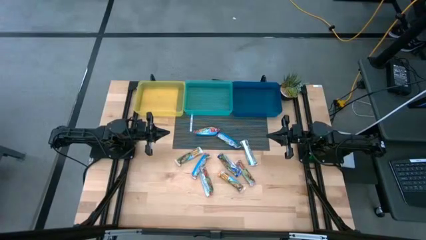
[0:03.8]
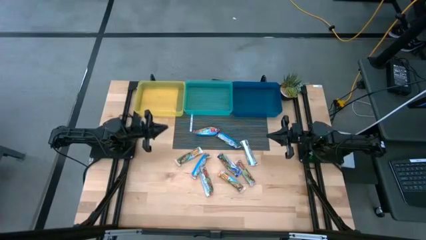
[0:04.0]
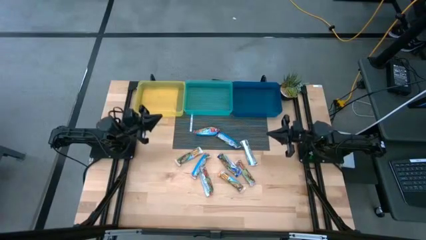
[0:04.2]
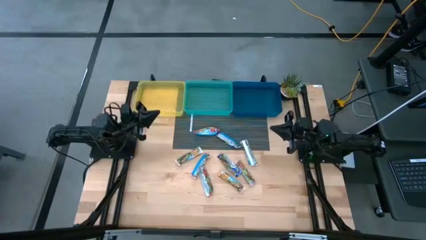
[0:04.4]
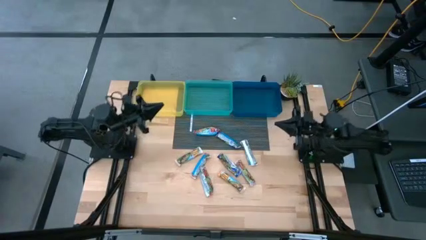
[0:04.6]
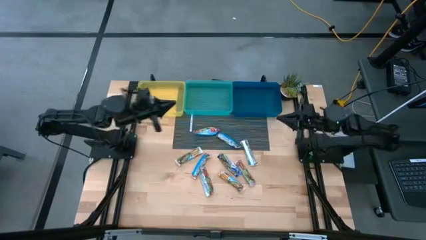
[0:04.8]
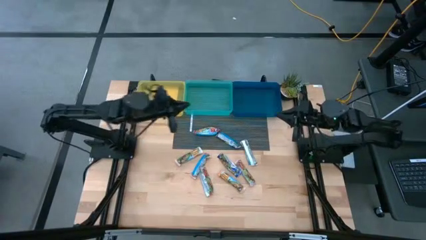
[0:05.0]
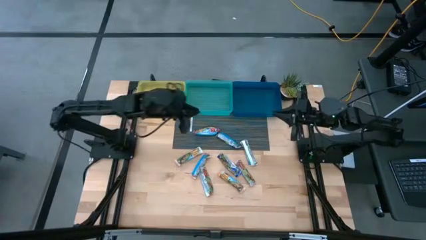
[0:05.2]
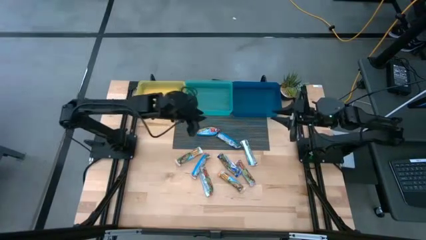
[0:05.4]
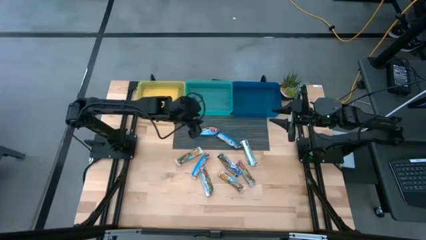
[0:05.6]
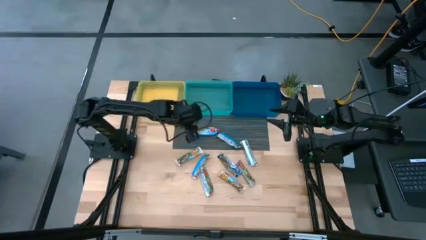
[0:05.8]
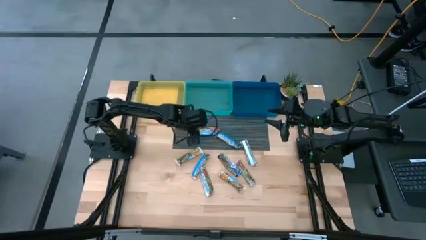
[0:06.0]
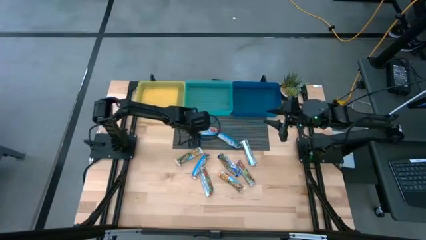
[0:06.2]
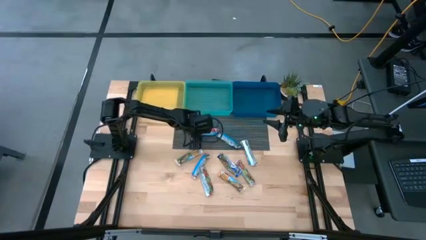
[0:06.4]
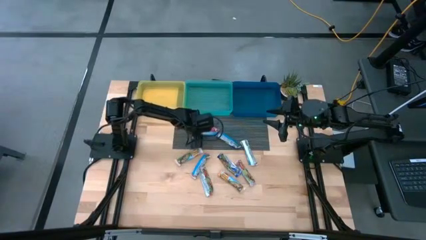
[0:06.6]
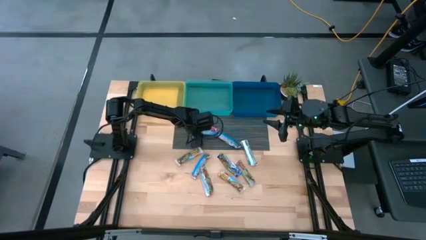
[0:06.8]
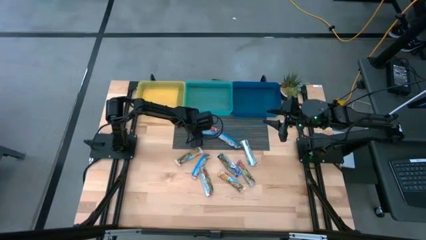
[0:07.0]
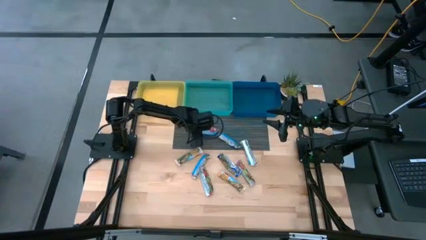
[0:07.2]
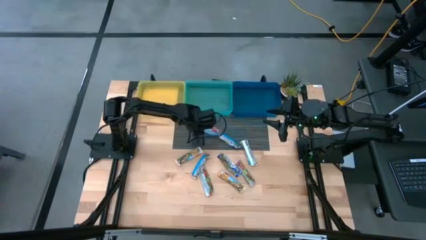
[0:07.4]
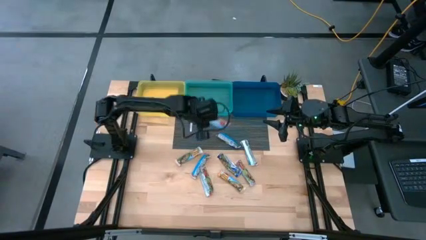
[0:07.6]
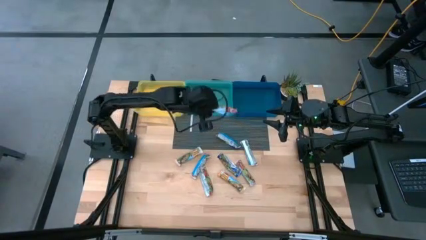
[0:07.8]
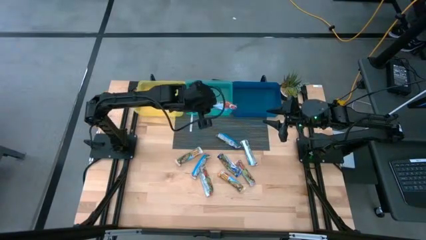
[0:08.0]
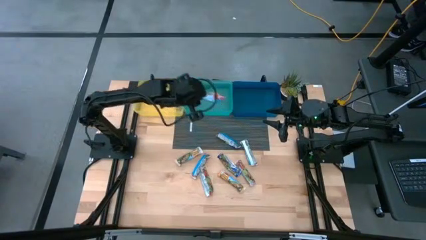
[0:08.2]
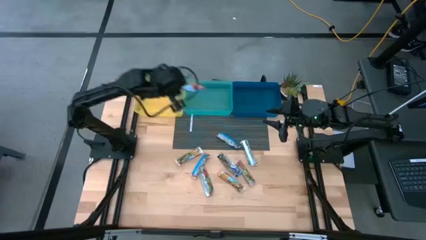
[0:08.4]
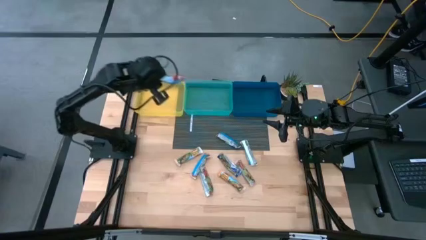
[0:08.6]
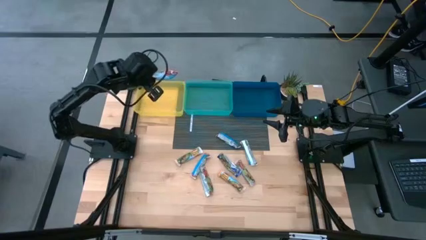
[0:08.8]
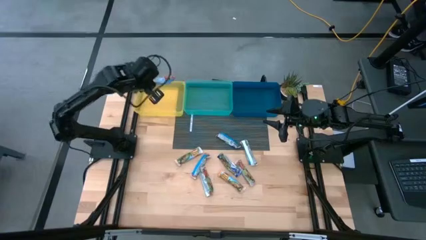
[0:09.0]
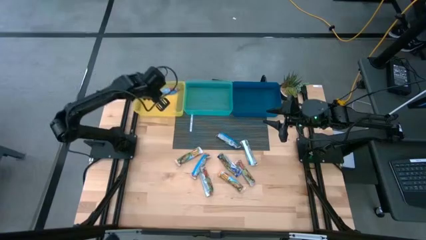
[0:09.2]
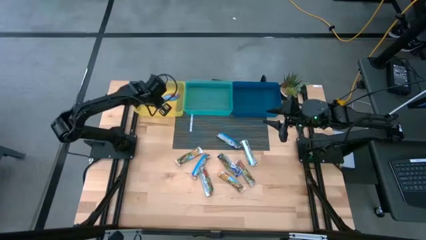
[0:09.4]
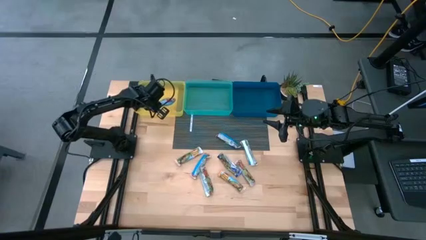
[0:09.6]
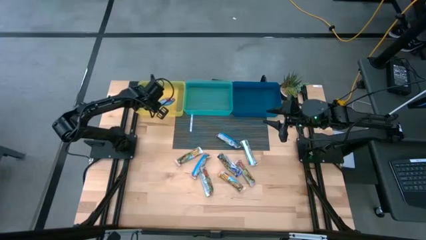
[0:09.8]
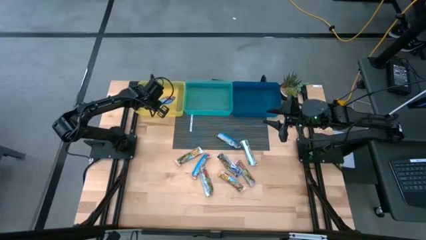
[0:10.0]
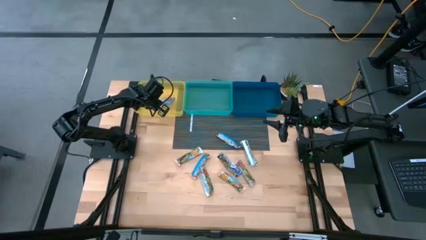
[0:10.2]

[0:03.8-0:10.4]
Task: Pick and place Granola Bars by type
Put the red granola bar into the yellow bin

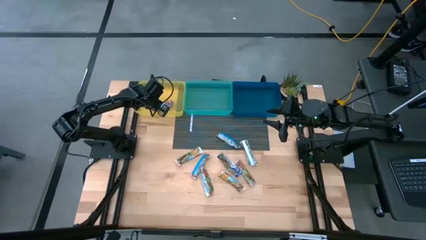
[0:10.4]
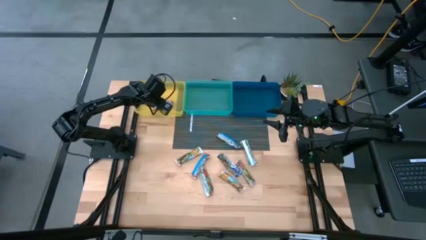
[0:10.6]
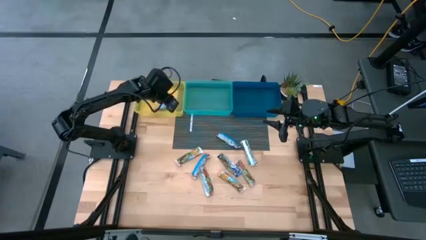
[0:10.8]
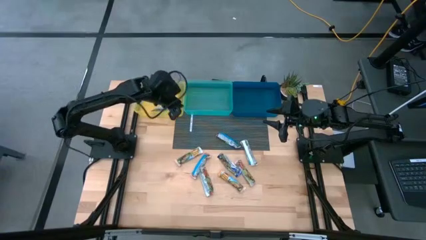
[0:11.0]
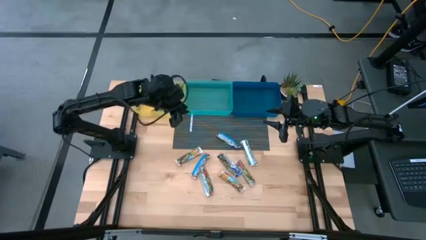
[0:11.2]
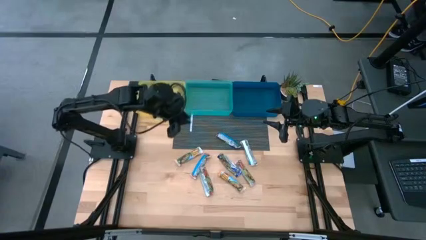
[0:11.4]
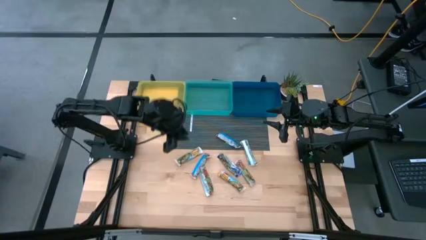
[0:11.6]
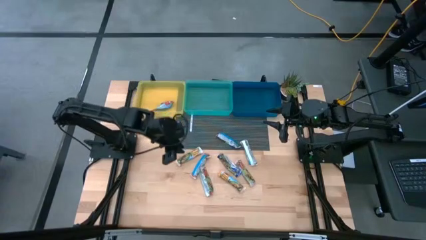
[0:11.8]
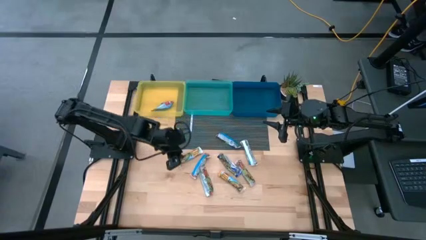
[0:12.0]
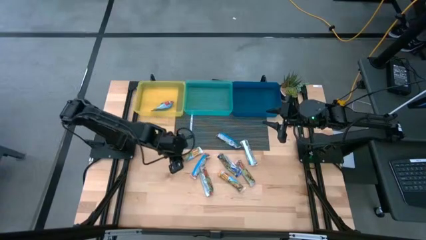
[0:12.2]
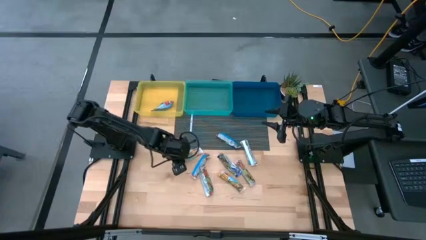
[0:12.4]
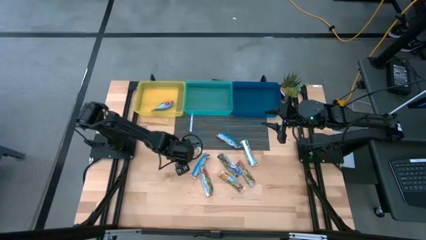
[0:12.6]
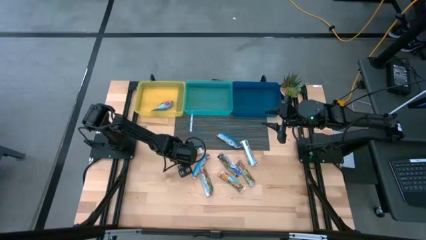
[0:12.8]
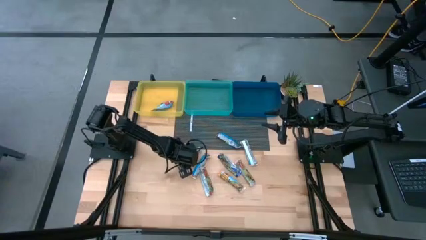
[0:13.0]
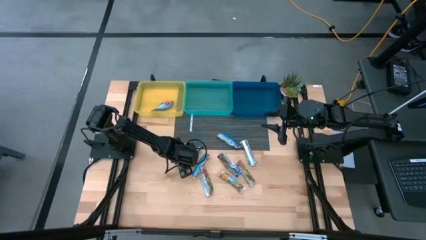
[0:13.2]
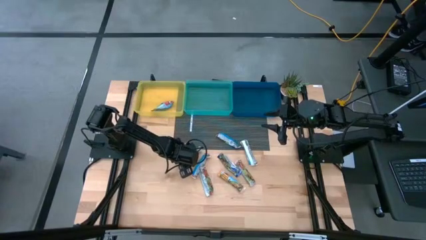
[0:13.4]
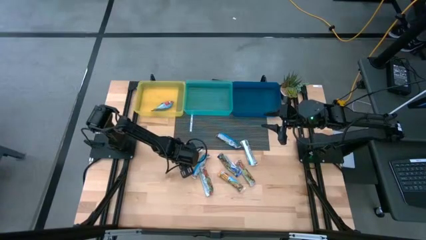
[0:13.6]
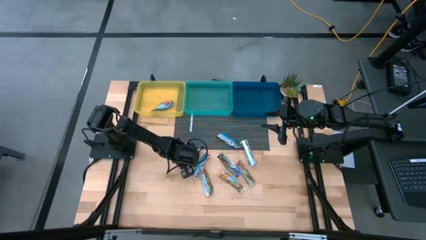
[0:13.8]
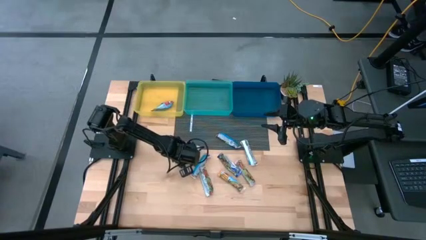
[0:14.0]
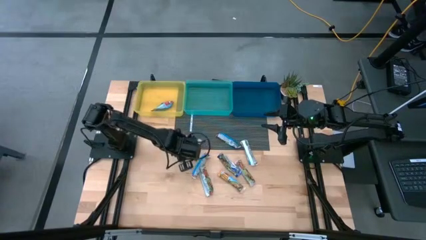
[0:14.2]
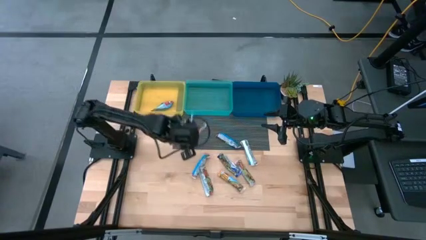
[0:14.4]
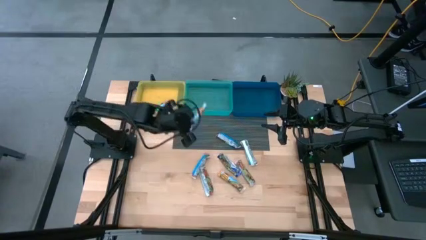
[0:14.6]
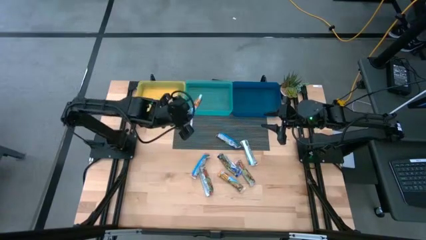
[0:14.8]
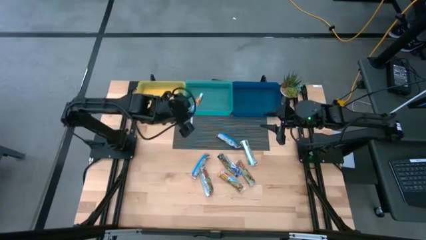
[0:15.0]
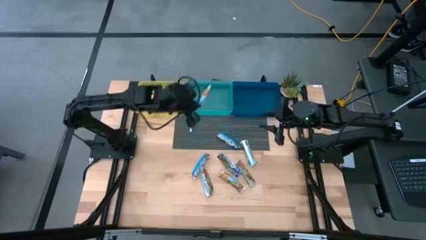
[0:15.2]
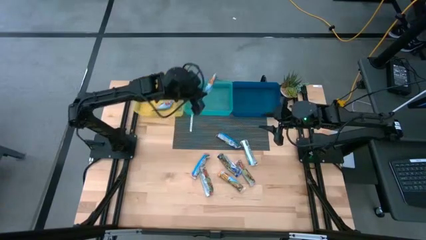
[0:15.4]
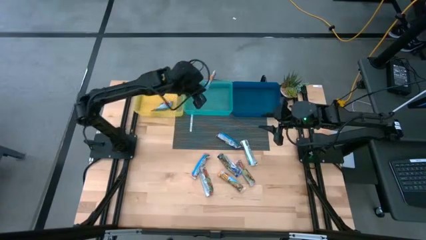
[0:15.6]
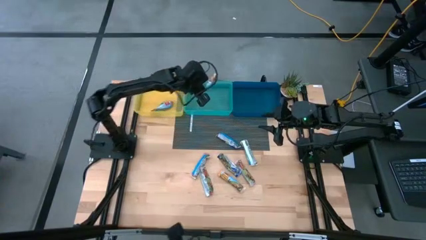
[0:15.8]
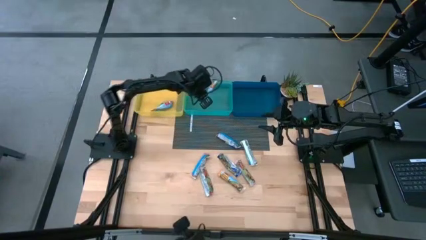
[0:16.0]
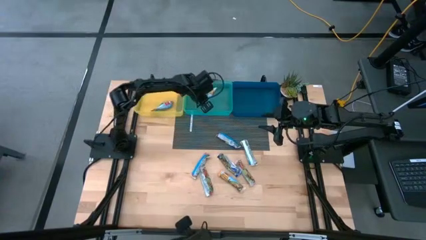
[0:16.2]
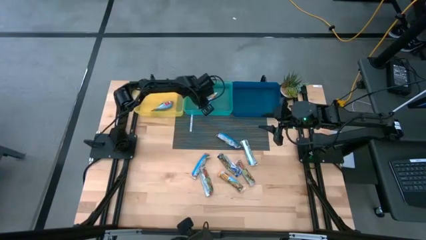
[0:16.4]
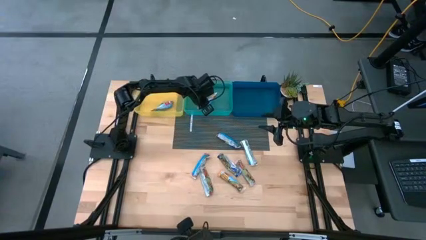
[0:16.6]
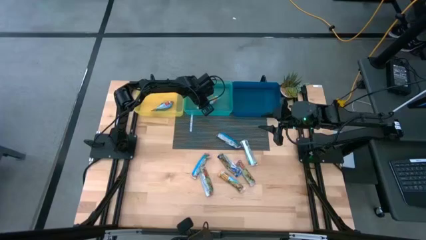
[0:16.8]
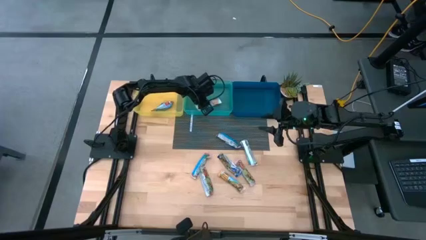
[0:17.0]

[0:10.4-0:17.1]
Put the yellow granola bar into the green bin

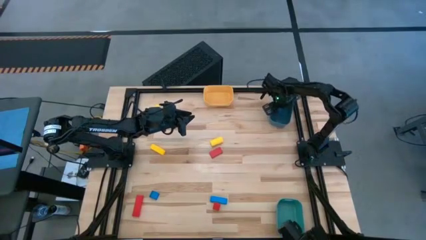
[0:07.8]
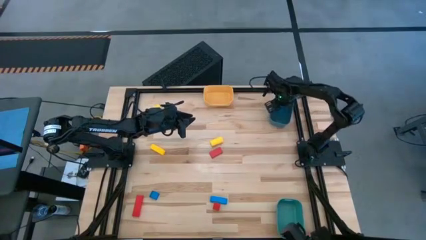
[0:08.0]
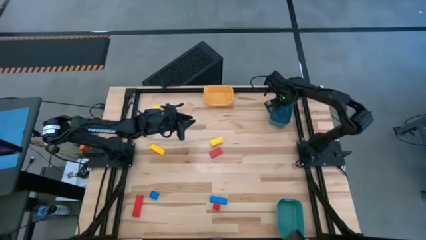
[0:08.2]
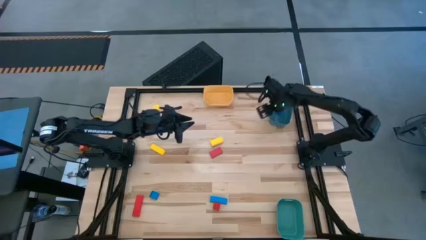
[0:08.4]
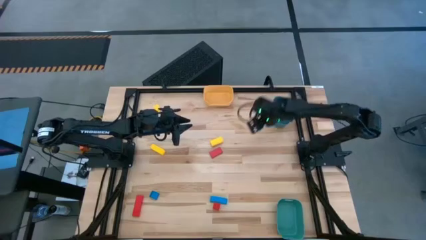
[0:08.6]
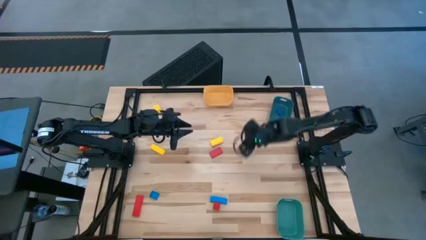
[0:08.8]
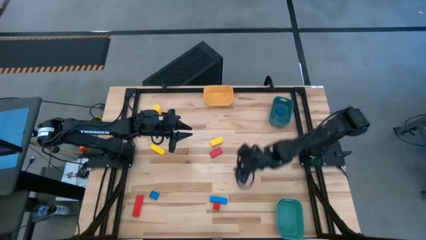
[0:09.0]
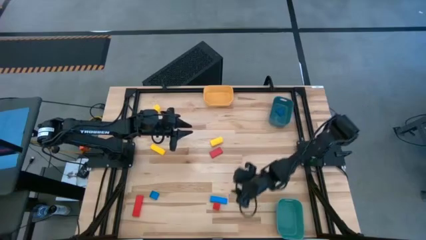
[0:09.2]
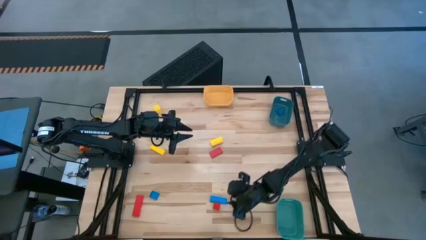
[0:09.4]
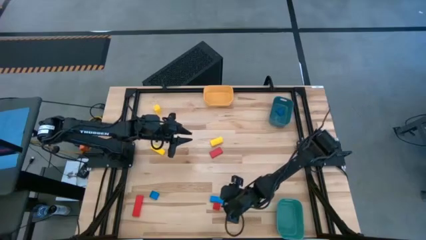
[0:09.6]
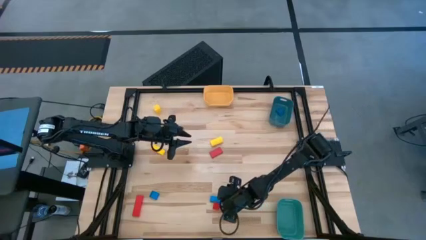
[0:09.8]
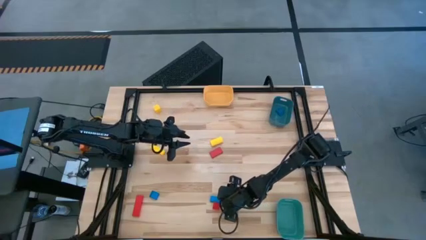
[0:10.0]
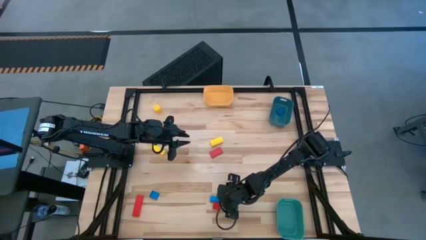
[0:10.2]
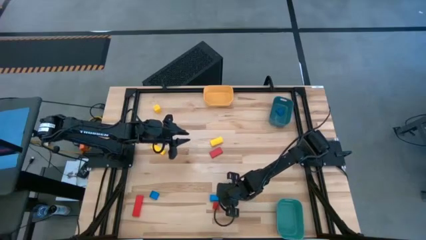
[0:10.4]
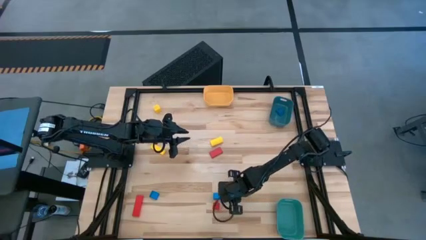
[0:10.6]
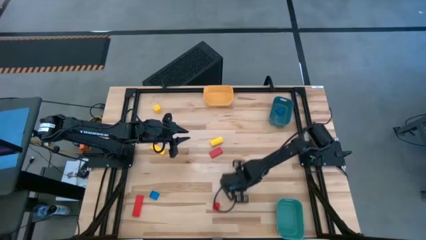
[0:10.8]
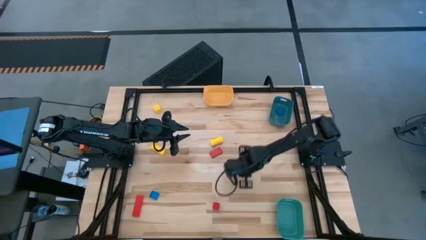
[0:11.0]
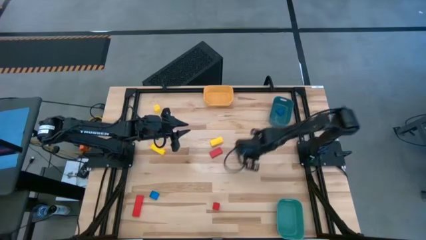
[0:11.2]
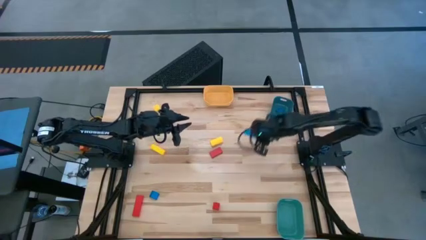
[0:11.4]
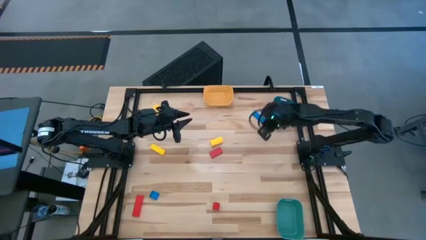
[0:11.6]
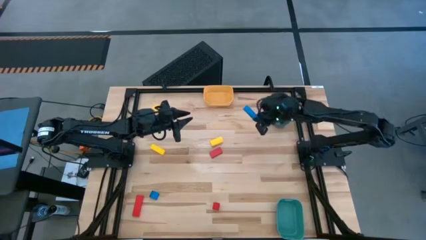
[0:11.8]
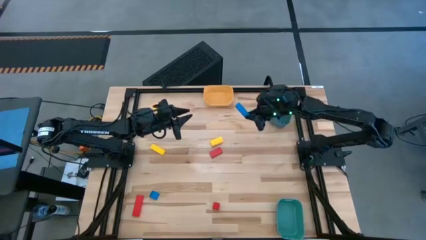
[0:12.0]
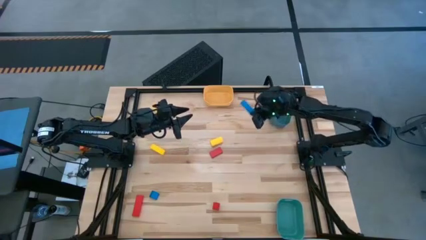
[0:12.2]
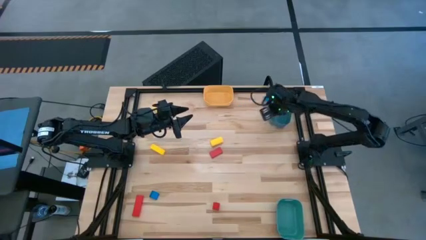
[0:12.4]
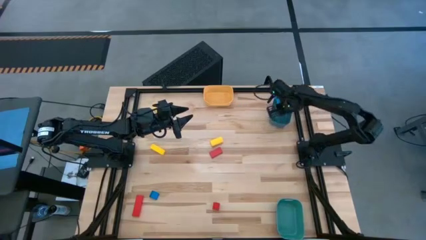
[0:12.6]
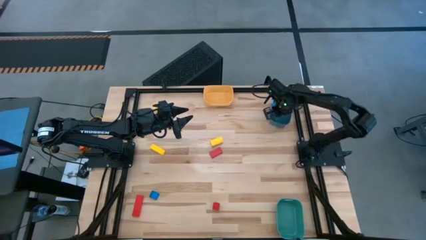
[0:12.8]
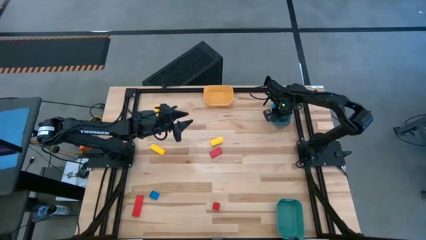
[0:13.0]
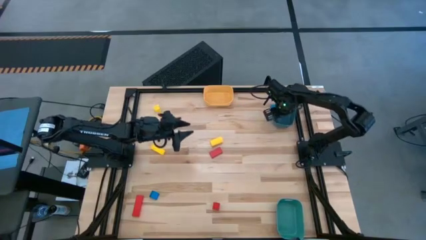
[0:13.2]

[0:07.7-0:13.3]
Task: Sort & place blocks by color
Put the right blue block into the blue bin
